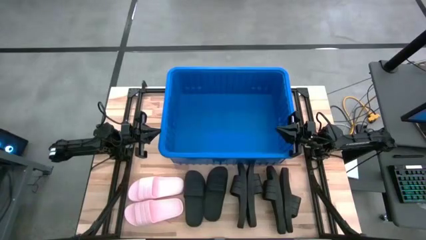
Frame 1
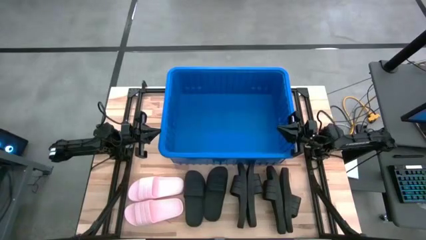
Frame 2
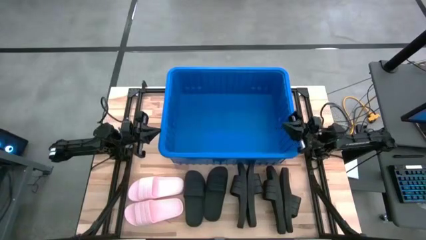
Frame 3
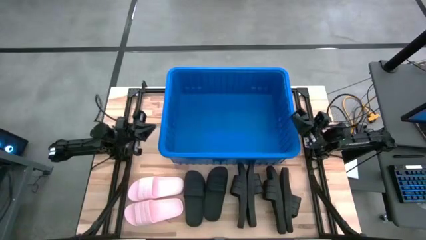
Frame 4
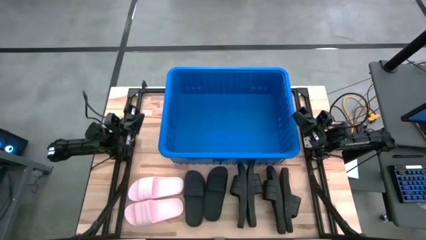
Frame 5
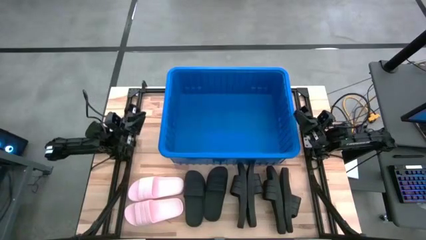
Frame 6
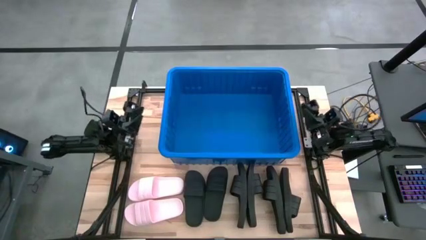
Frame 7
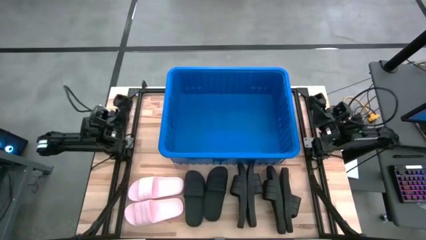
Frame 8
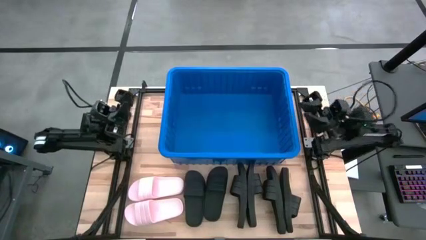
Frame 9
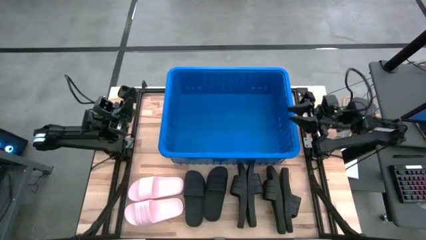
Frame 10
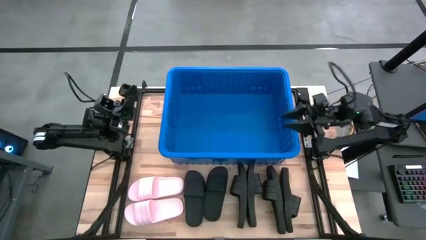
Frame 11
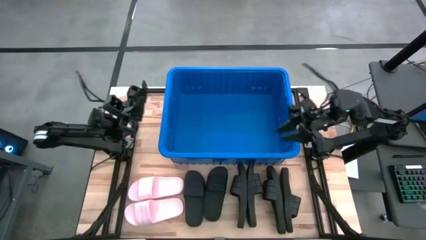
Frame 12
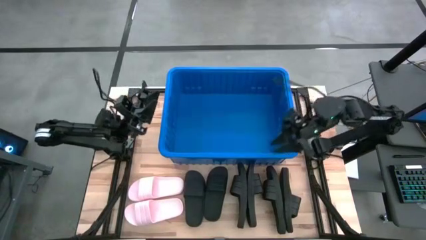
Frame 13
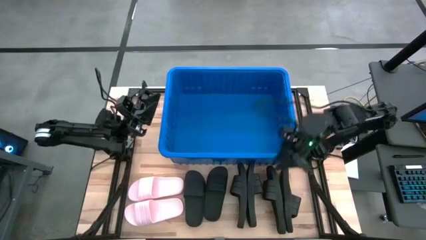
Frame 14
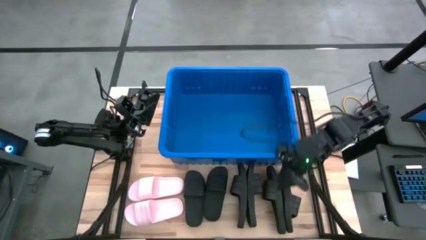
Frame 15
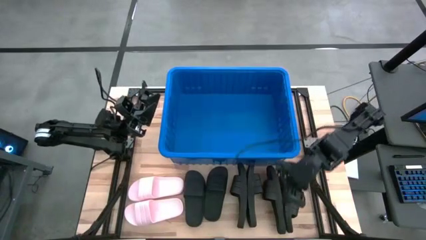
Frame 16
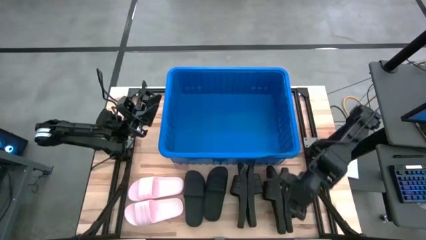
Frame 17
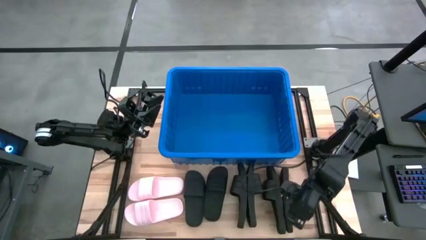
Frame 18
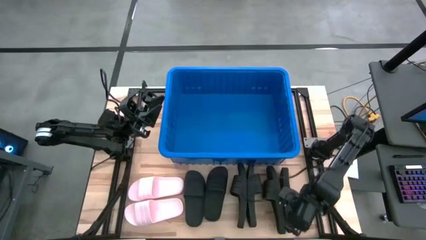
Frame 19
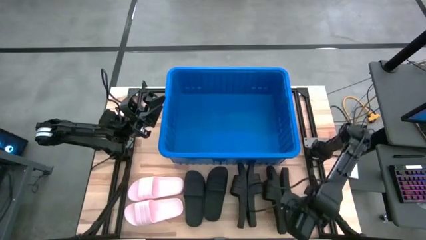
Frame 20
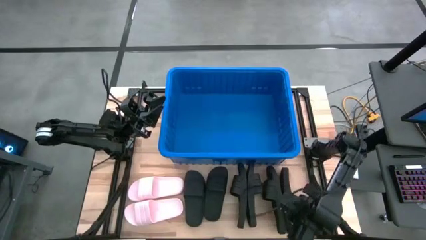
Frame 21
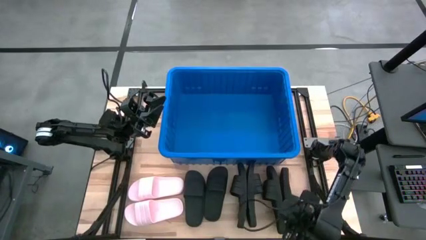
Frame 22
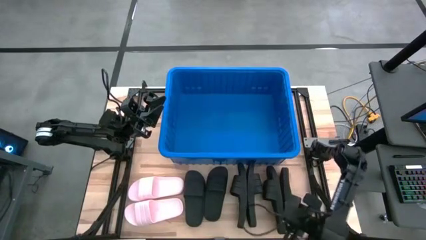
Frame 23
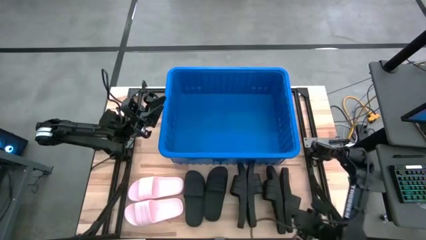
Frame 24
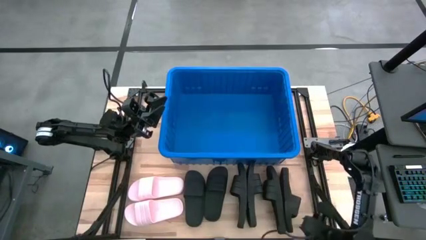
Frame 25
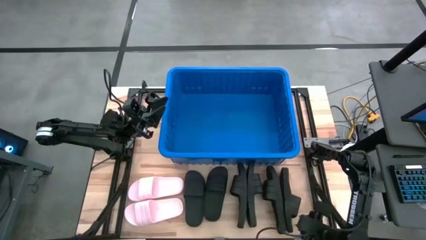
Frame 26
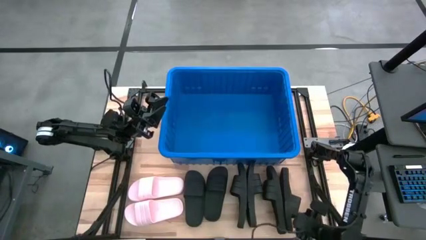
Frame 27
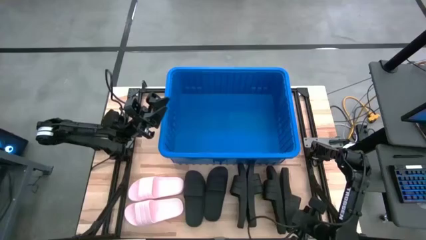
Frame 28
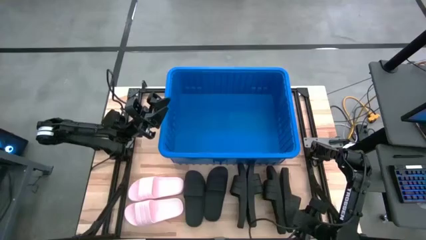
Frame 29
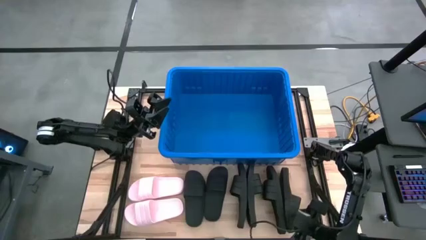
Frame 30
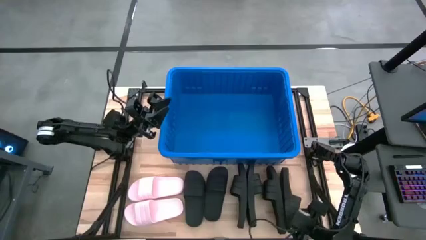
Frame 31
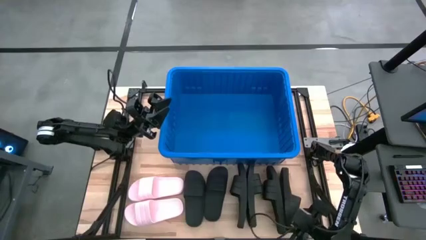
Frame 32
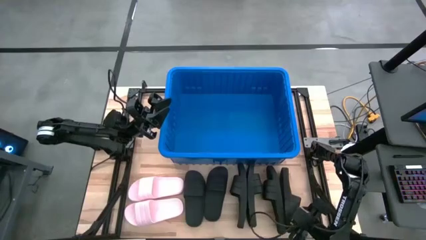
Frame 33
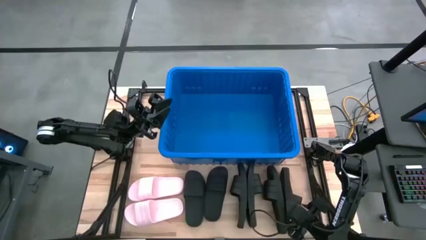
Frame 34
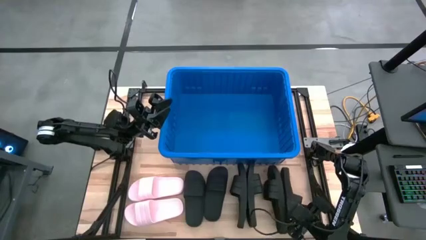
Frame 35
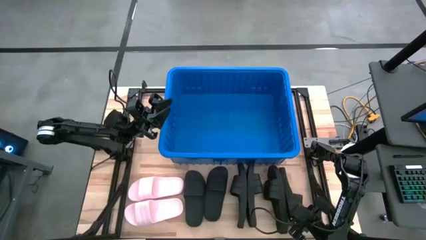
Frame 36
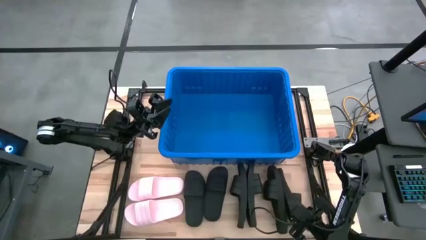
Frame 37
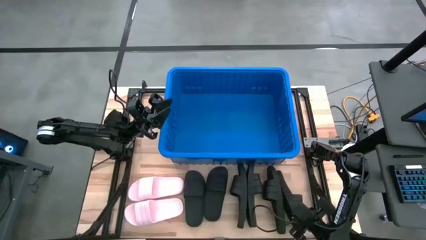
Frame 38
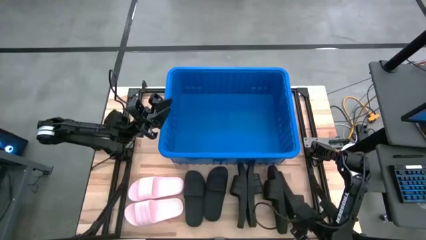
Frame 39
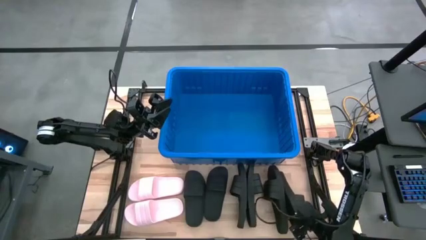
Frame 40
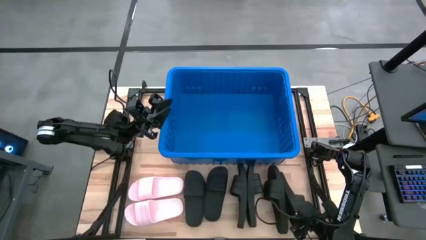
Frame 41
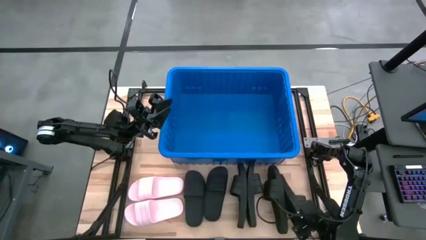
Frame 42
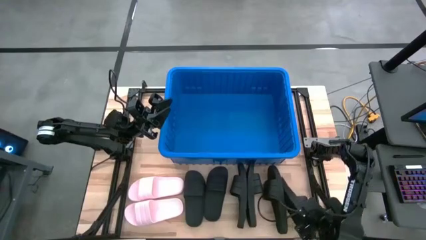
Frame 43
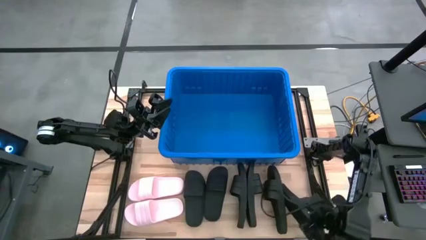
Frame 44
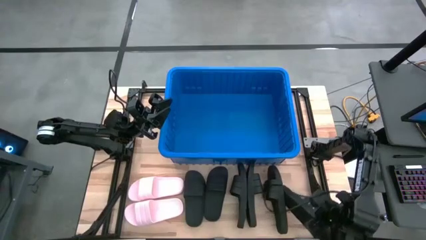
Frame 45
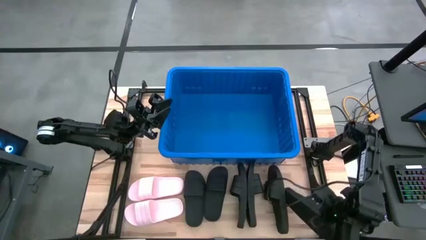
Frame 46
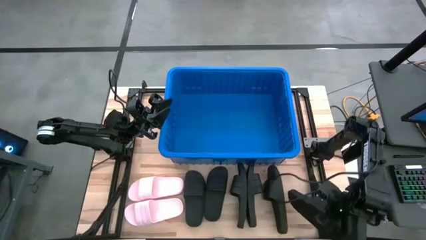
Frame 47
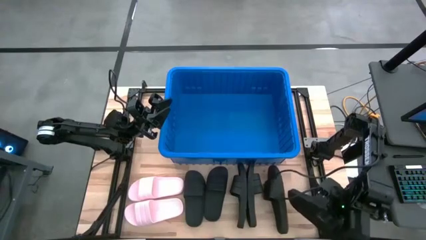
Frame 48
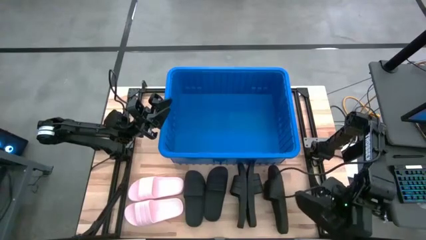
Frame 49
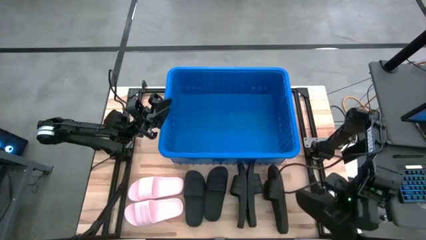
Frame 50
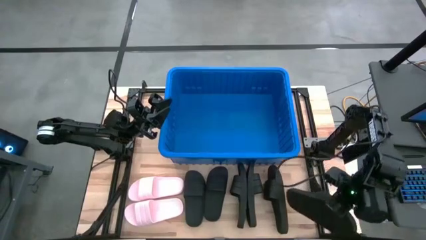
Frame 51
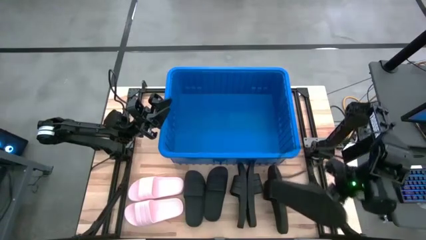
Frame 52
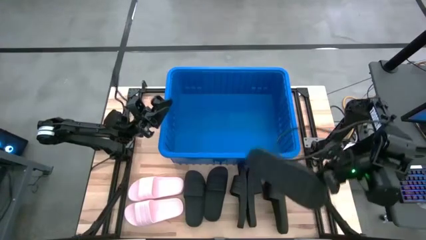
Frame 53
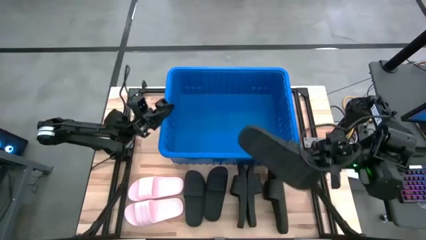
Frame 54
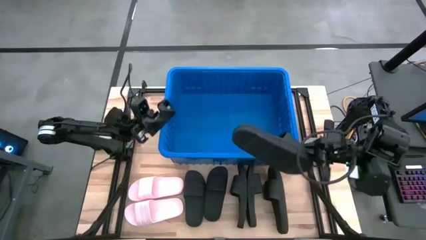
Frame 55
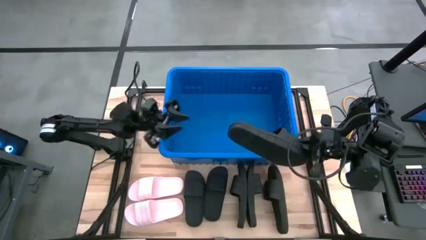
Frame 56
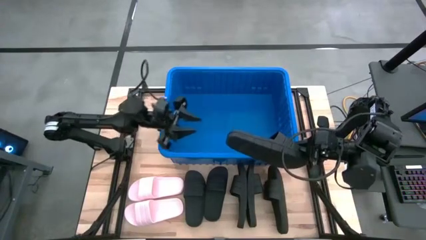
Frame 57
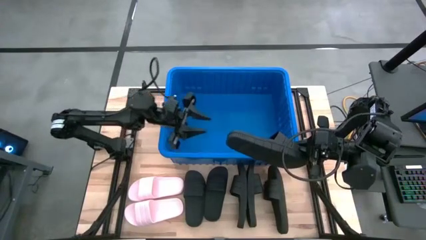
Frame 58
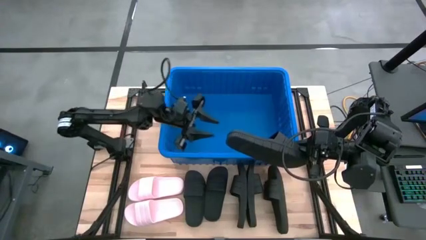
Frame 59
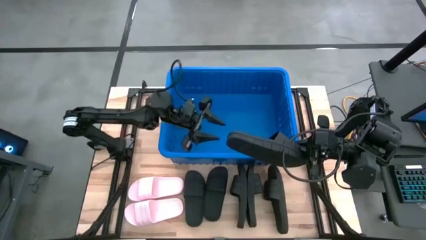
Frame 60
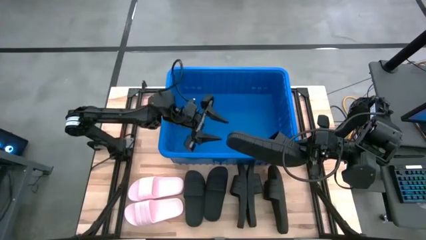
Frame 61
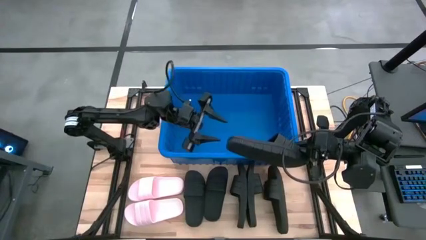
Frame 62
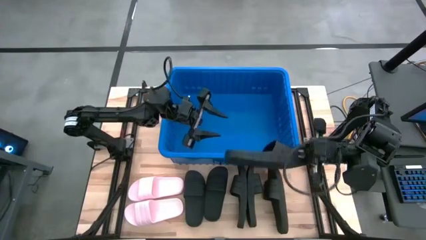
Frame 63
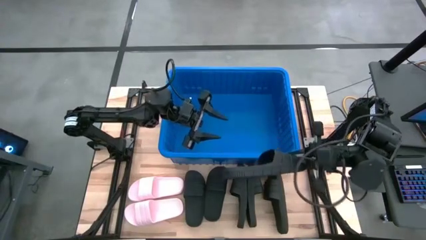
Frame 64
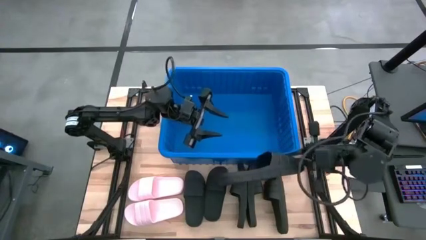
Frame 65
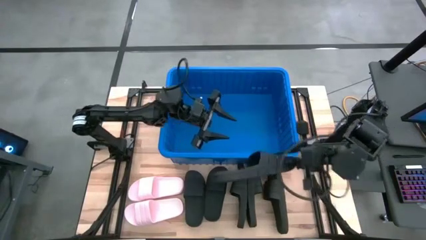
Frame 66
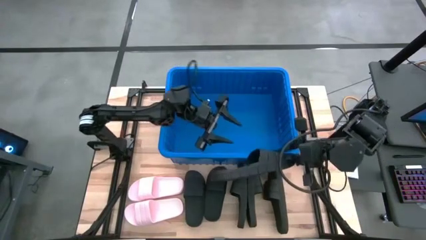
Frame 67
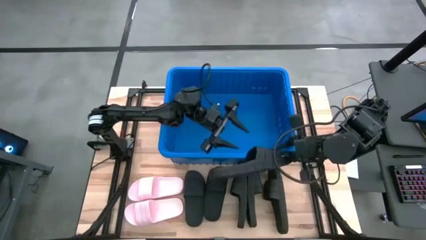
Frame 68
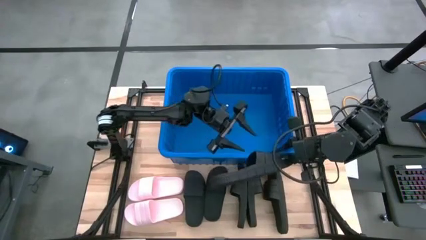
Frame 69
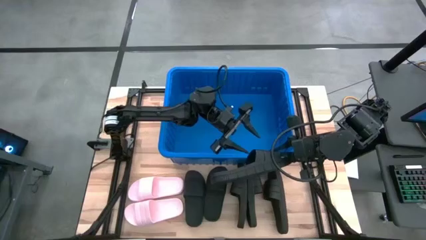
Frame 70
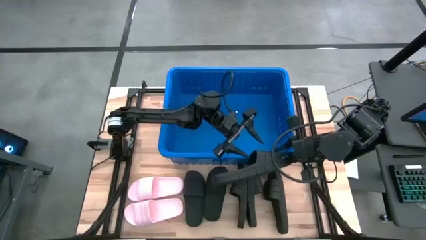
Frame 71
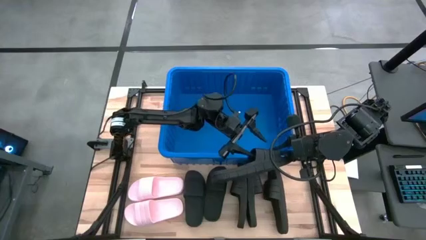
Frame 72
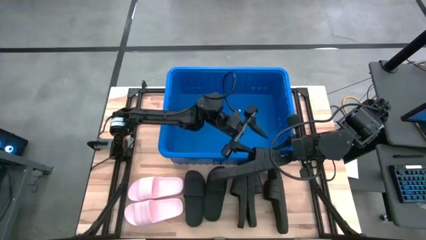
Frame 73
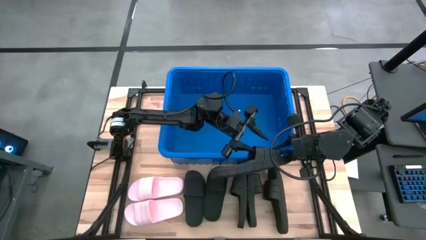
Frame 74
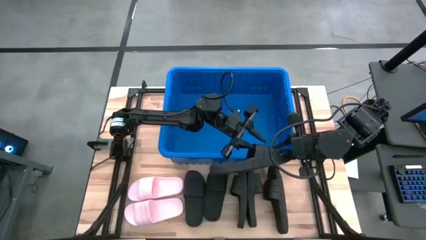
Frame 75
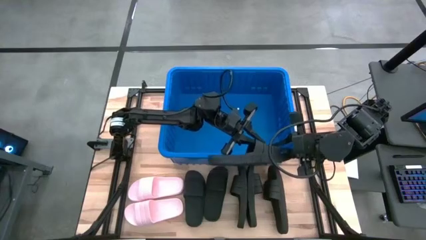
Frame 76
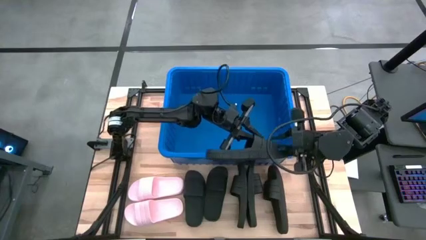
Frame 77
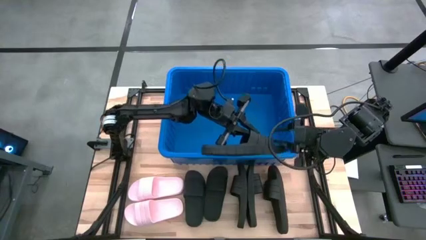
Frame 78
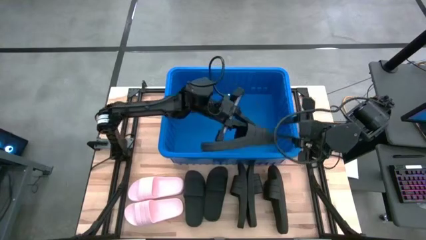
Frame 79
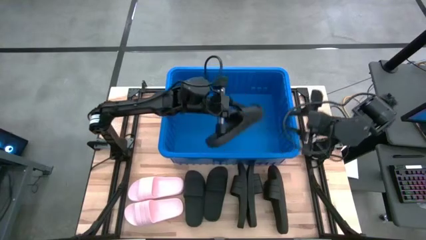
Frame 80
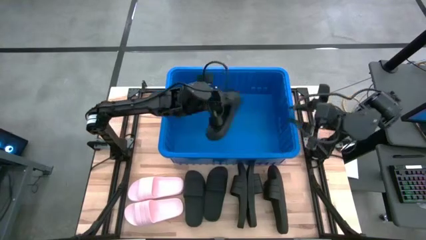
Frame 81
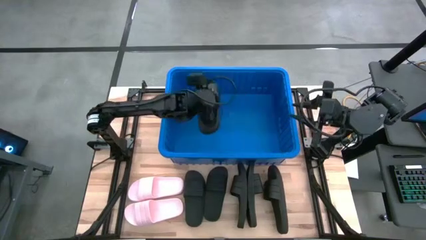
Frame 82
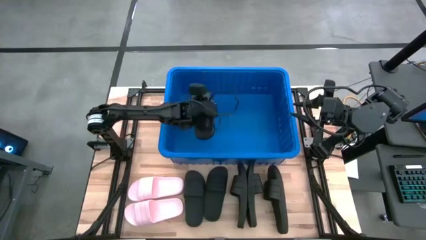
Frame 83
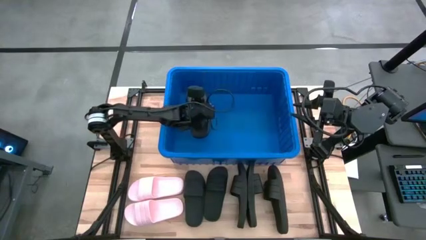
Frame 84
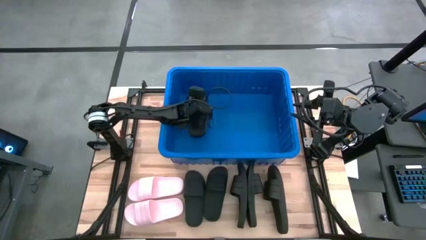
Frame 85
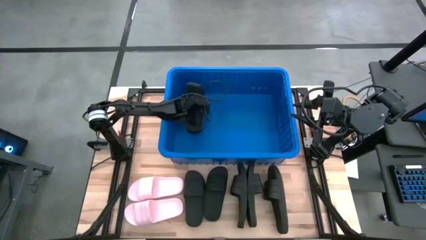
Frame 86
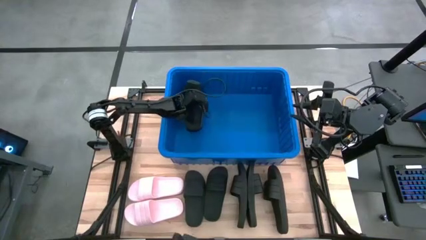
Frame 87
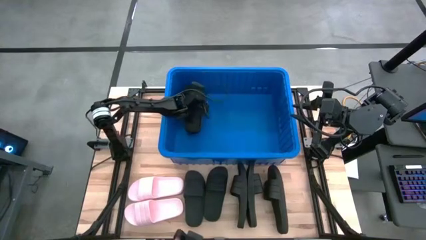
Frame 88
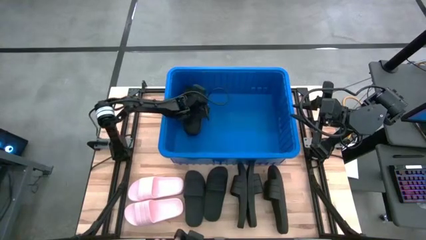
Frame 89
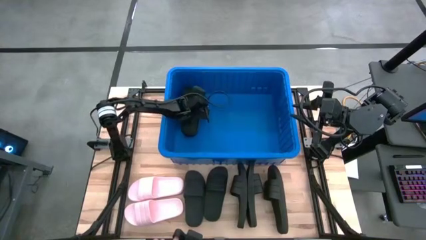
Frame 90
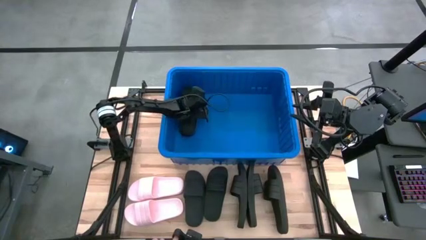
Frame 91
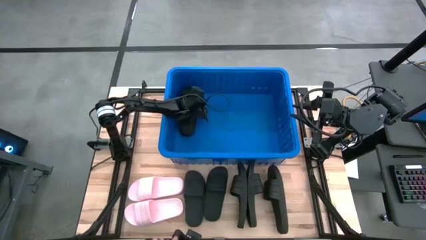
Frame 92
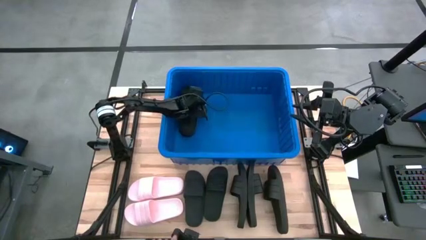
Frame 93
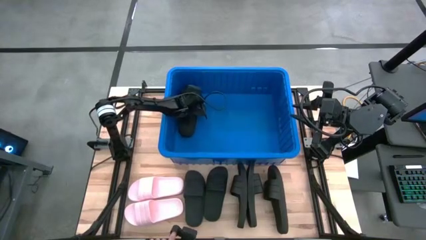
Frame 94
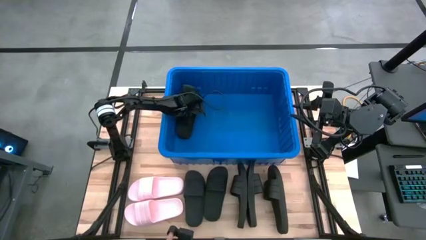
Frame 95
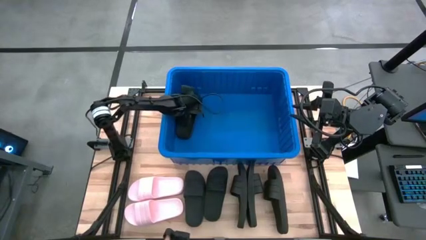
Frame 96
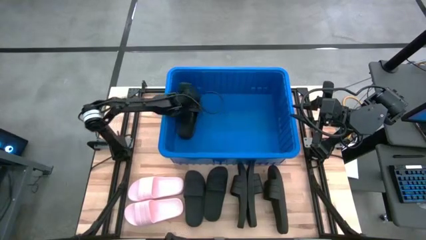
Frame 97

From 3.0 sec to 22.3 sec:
Task: Pick and place slides into bin
Put the black slide into the blue organizer bin
